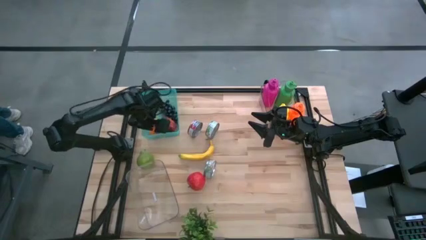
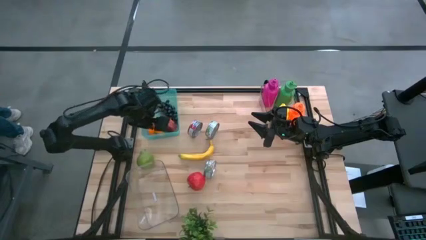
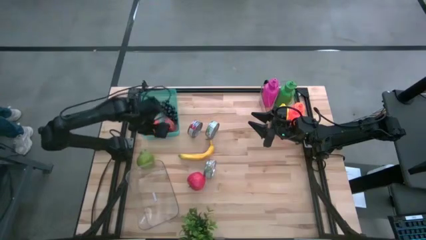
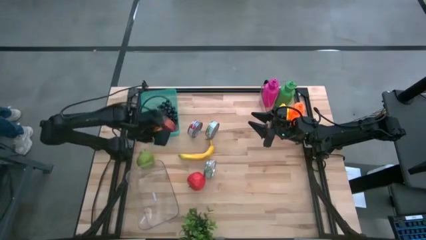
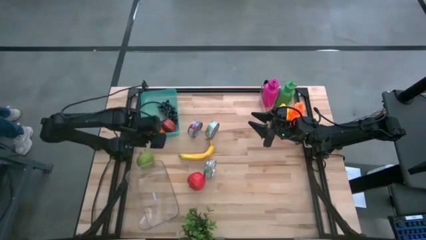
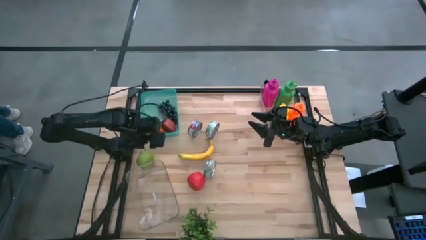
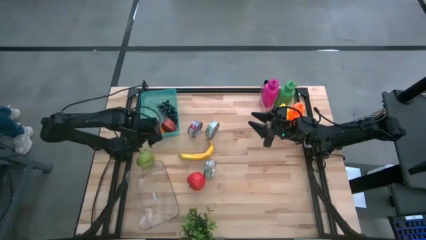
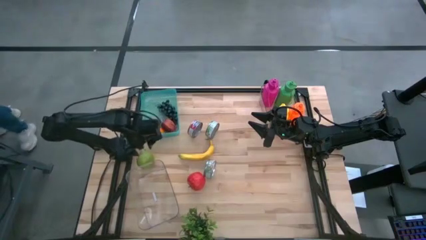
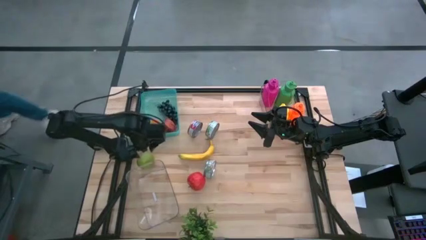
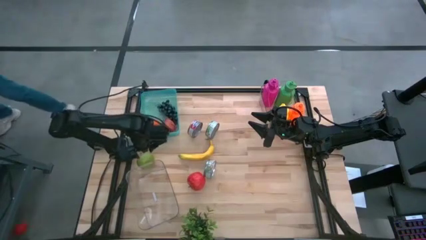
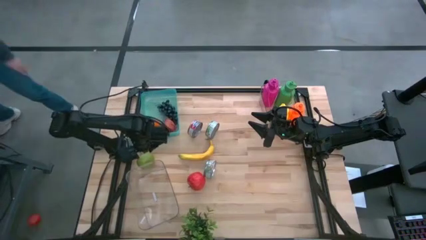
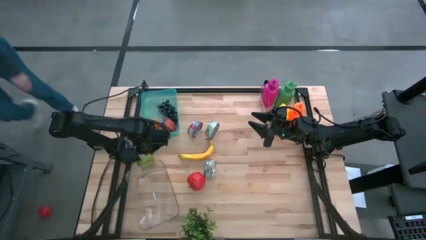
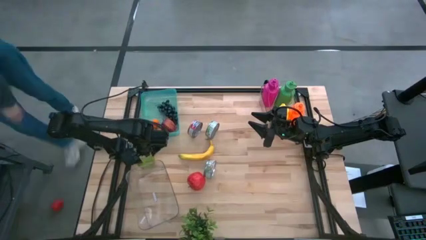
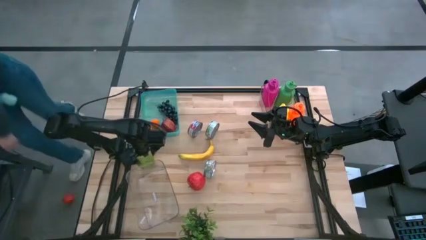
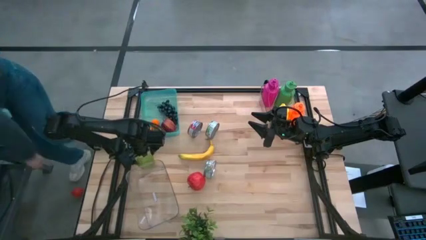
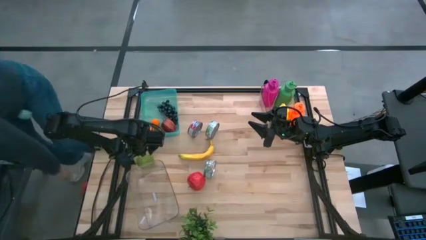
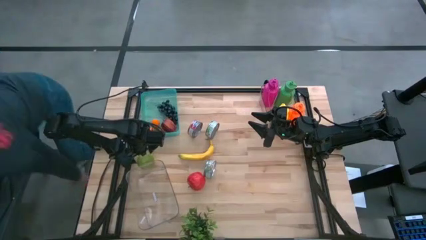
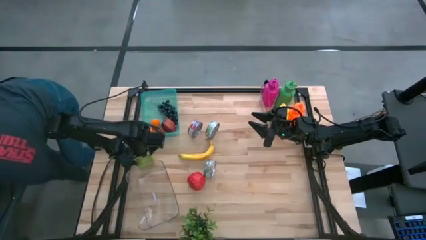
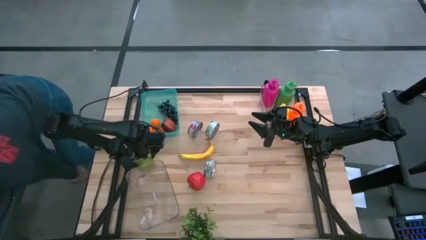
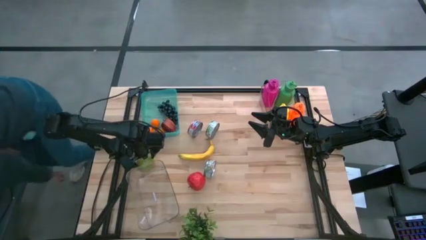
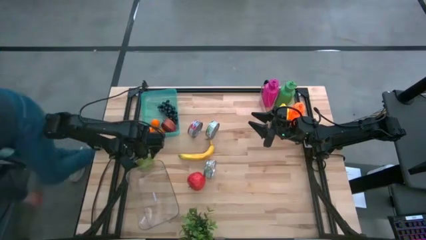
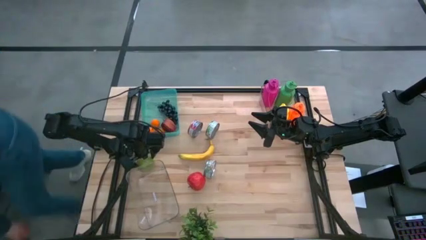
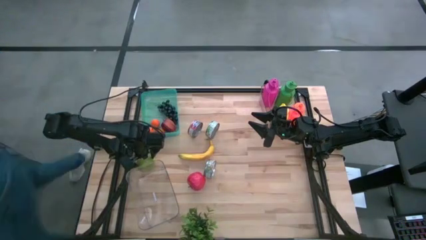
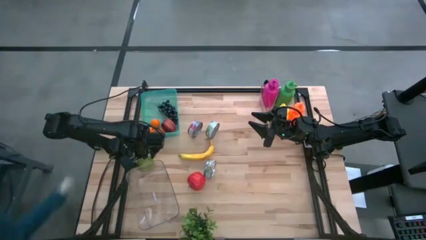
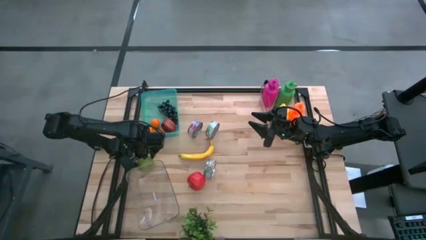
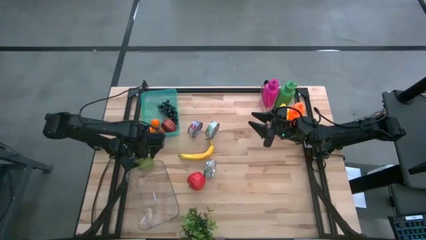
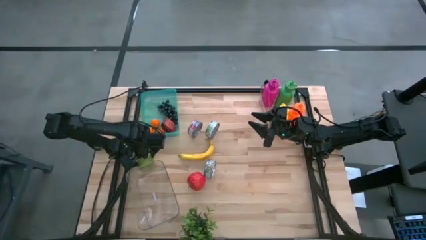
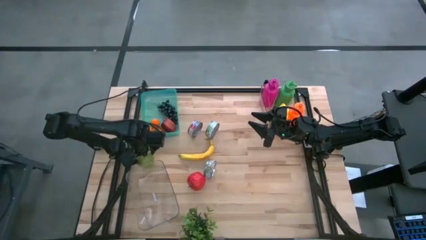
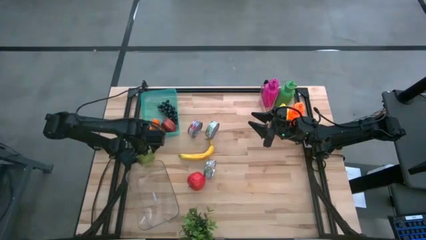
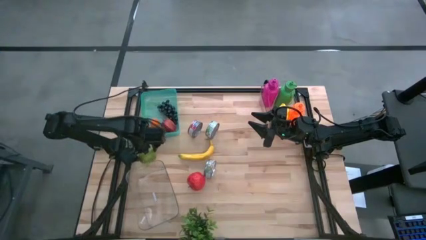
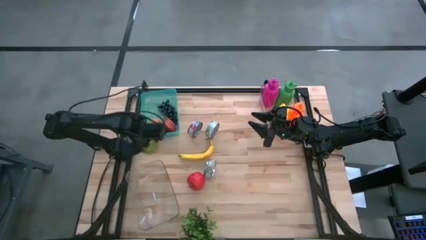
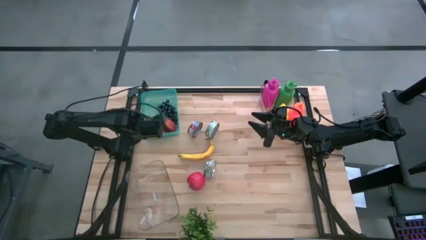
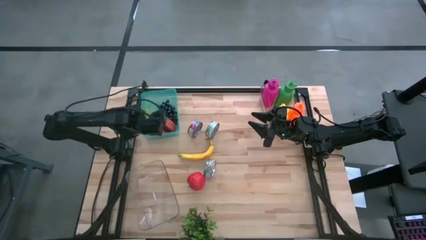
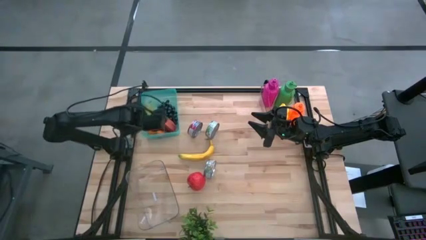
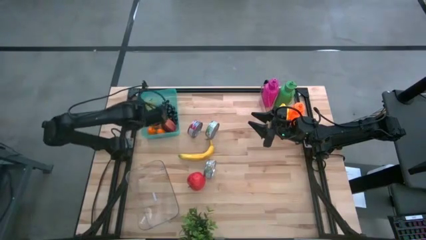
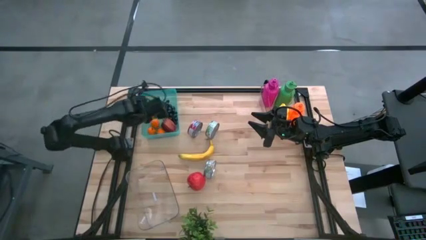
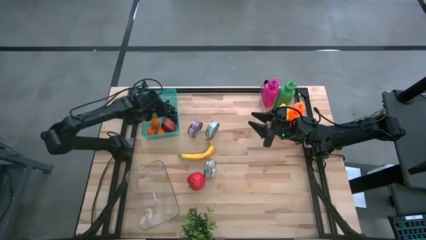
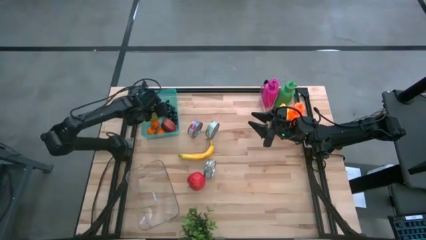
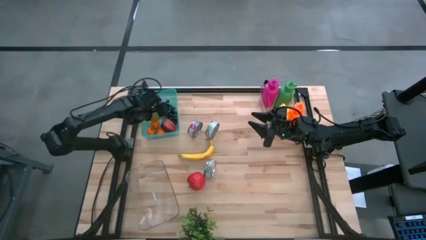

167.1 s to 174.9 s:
Task: Pick & Place Food Item
Put the green pear into the green bin

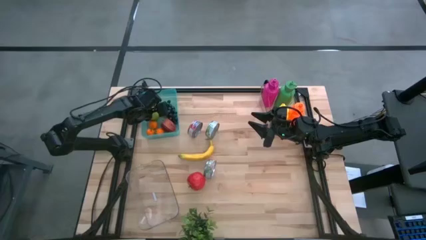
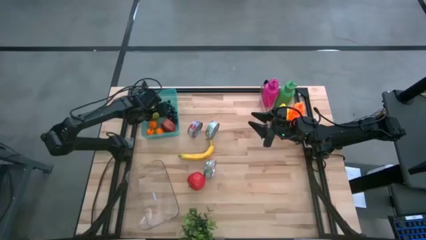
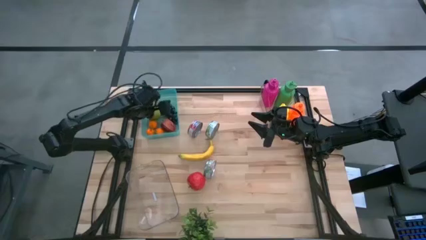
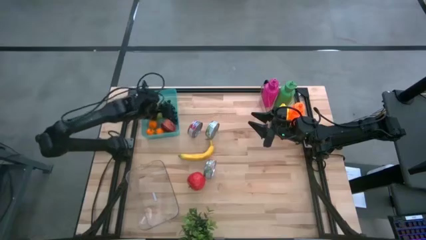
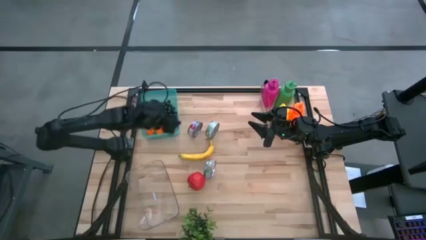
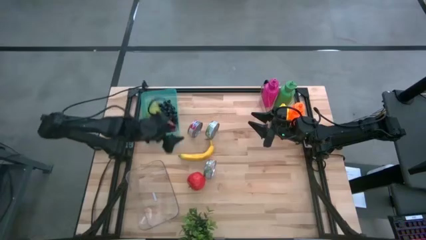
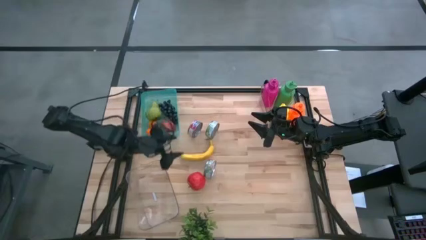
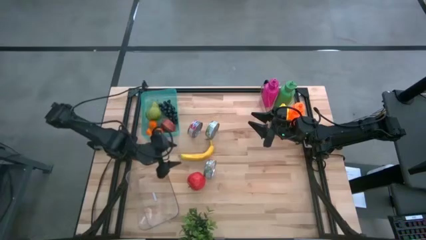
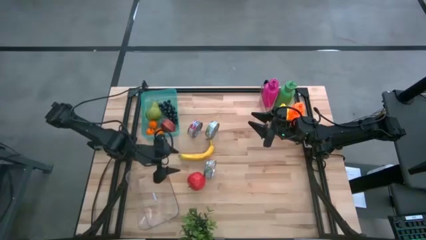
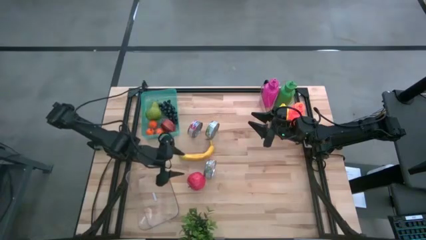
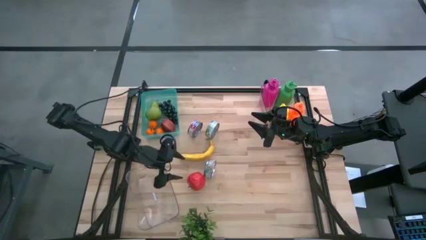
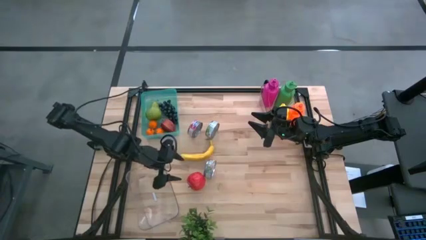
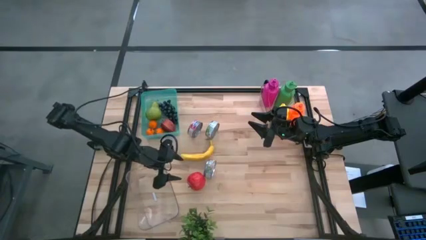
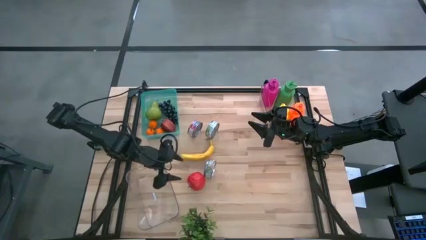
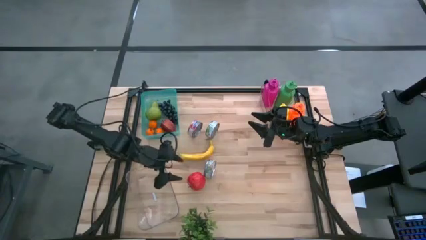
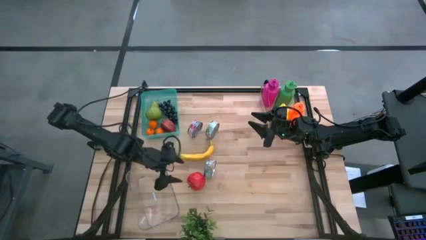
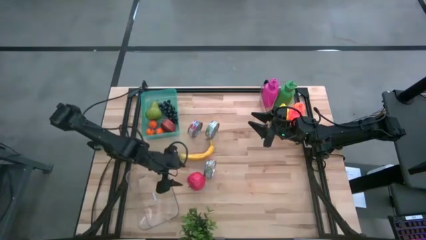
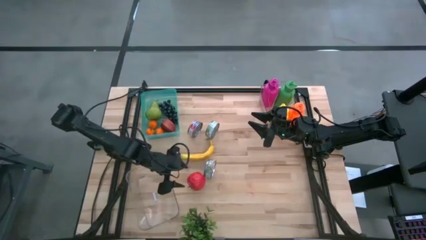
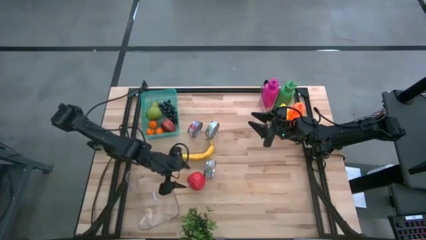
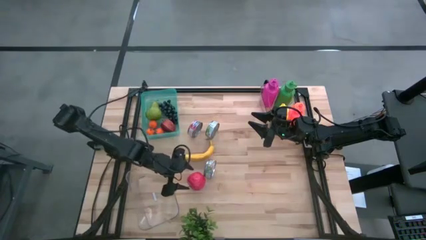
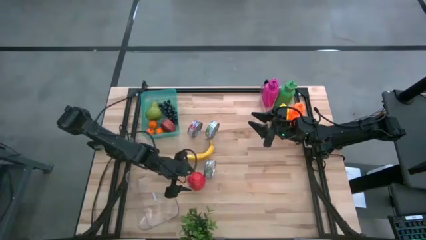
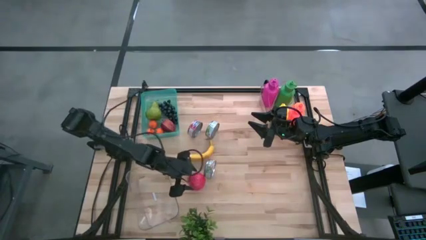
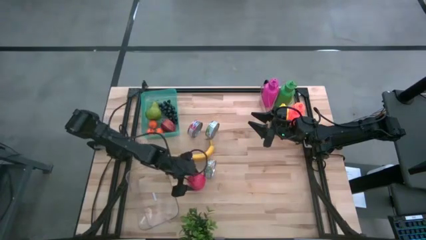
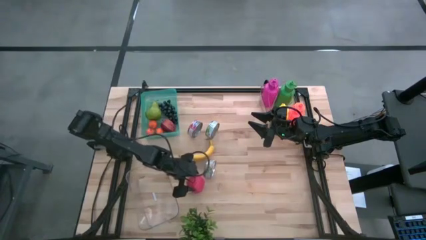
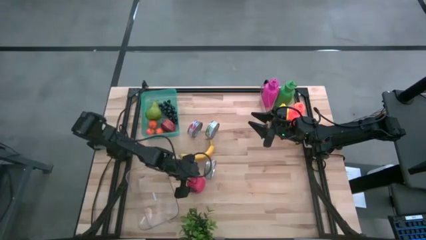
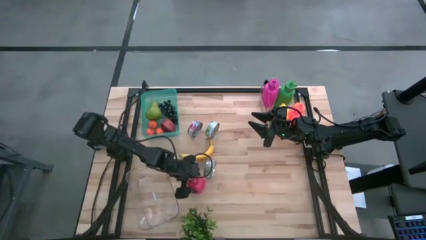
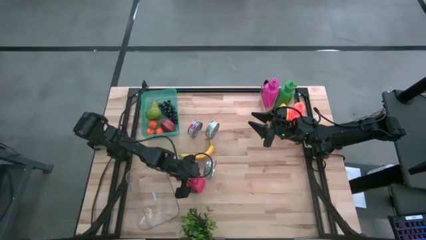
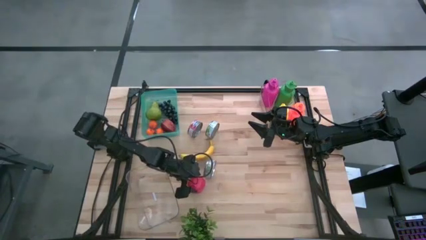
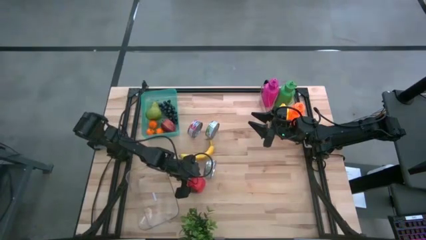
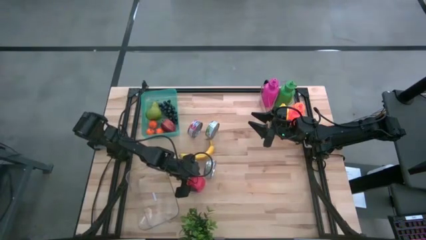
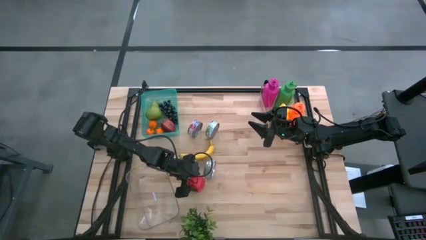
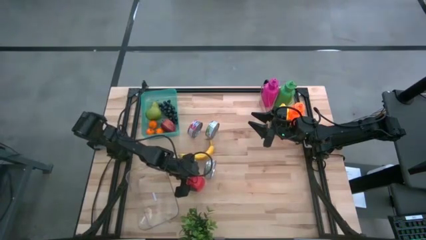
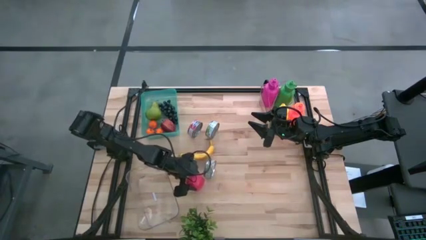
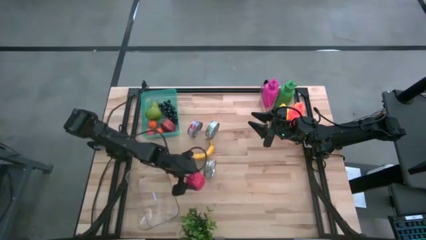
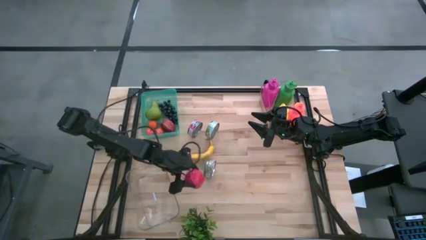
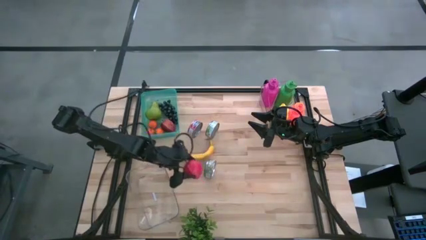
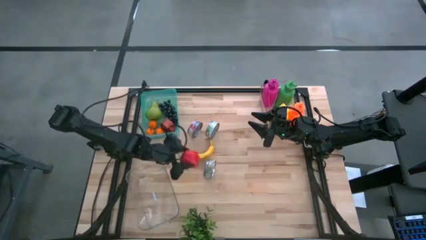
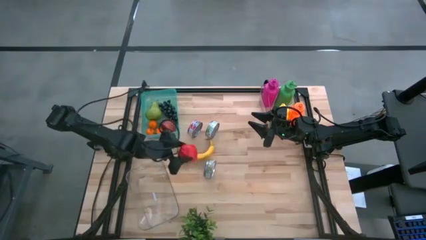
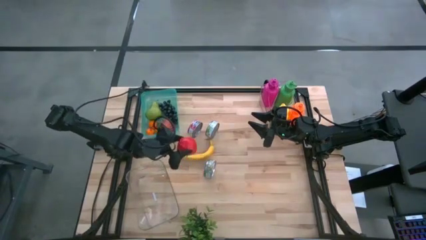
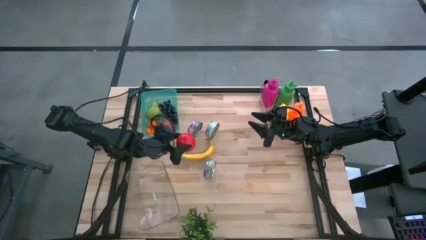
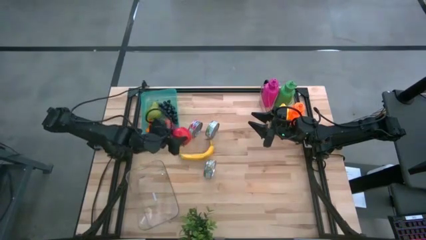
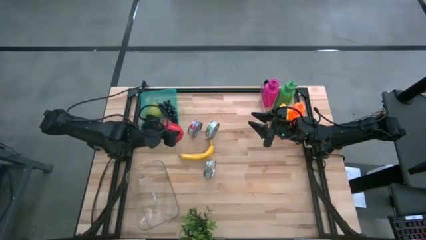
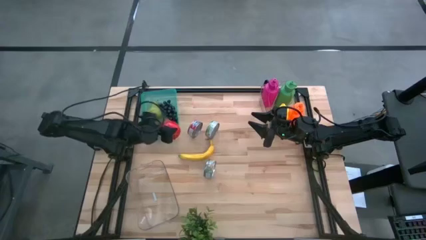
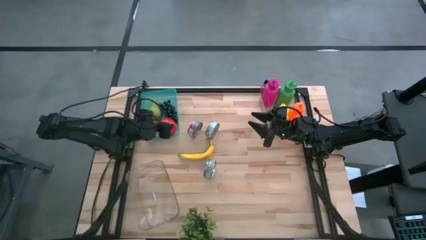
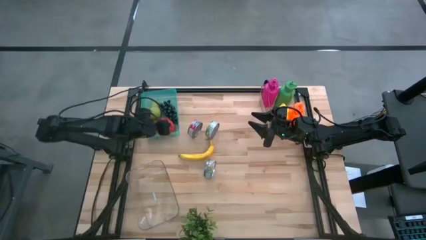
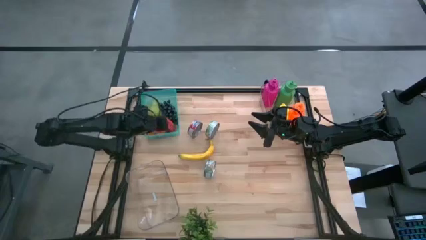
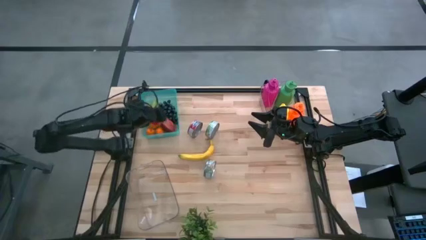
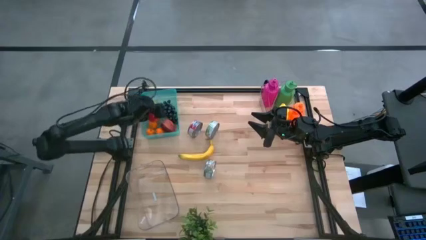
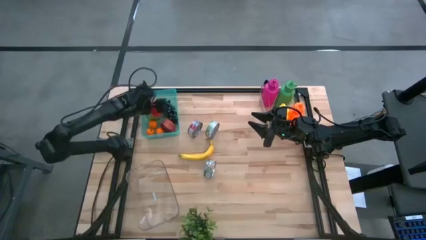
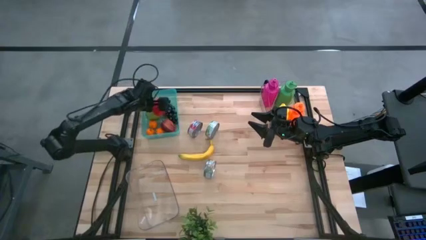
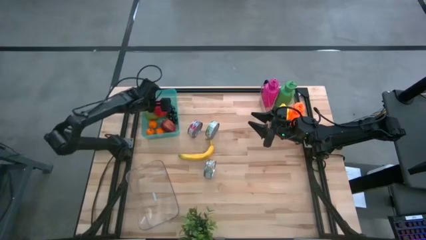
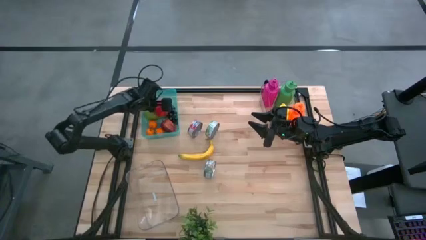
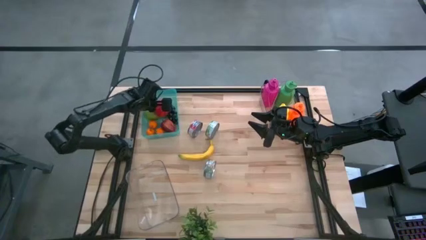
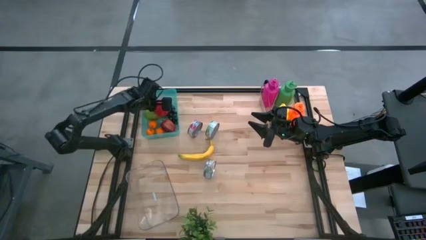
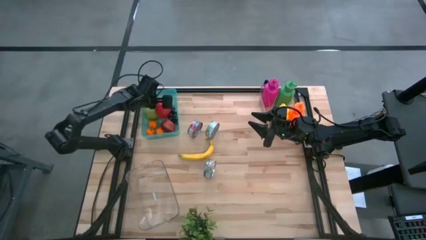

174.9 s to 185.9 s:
Put the red apple into the green bin
